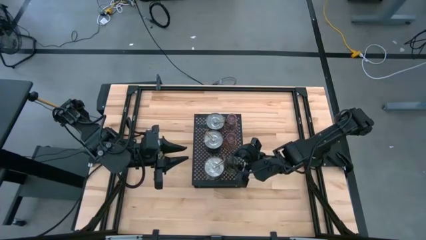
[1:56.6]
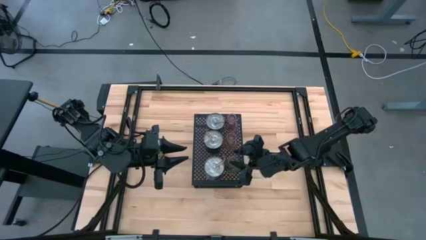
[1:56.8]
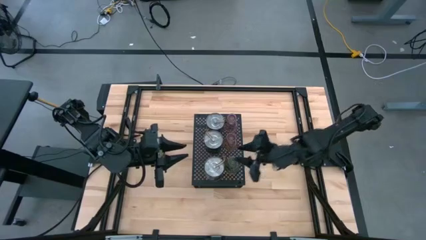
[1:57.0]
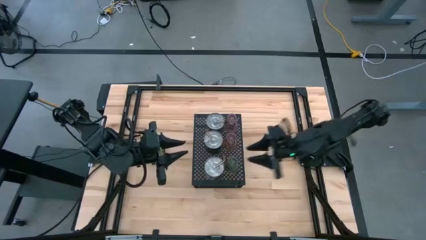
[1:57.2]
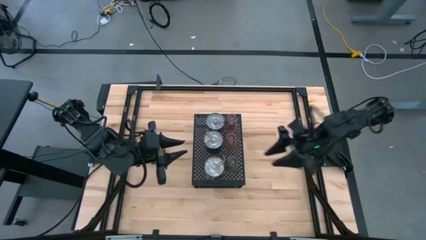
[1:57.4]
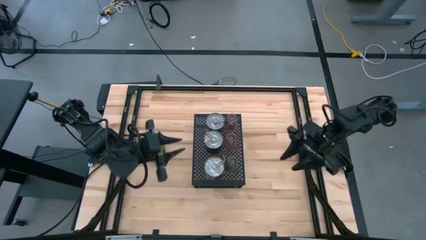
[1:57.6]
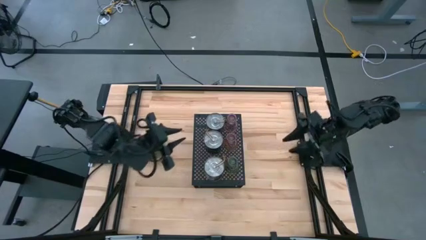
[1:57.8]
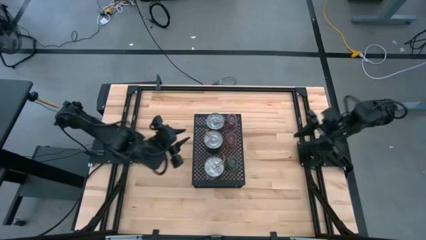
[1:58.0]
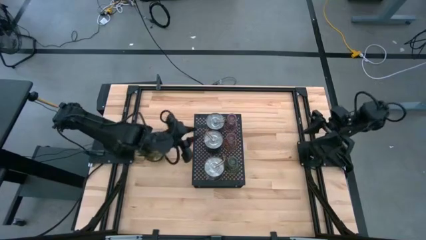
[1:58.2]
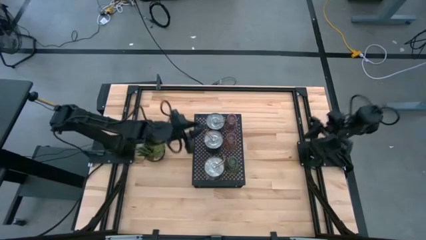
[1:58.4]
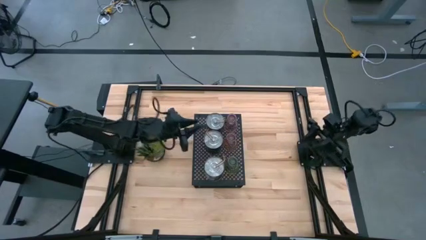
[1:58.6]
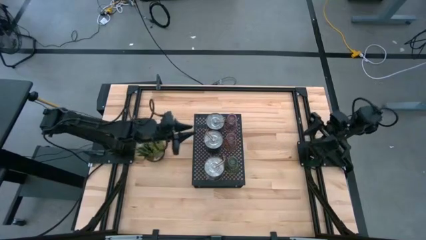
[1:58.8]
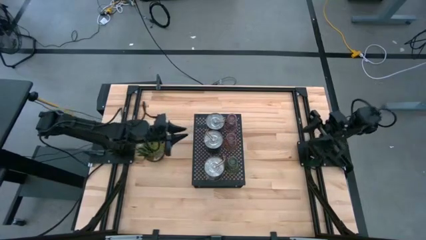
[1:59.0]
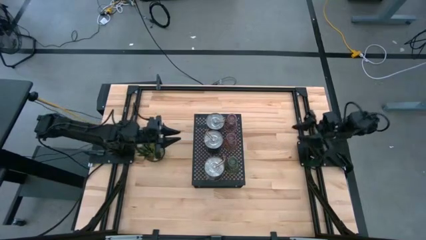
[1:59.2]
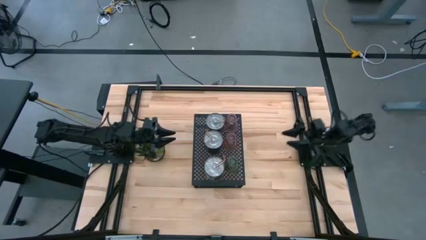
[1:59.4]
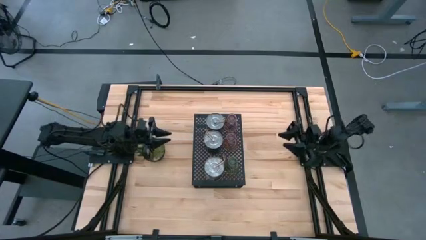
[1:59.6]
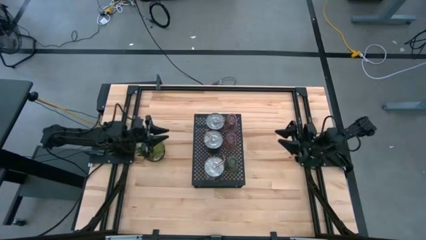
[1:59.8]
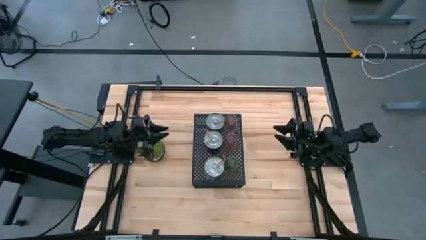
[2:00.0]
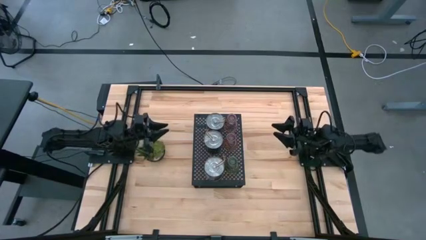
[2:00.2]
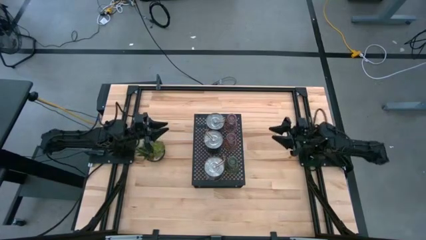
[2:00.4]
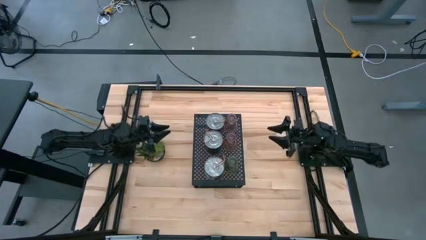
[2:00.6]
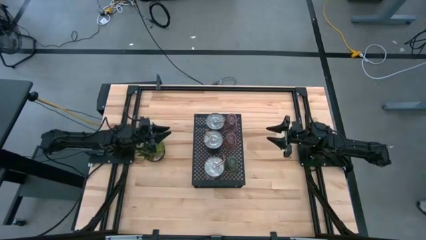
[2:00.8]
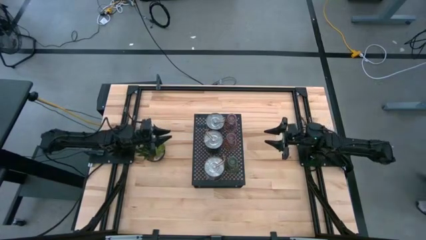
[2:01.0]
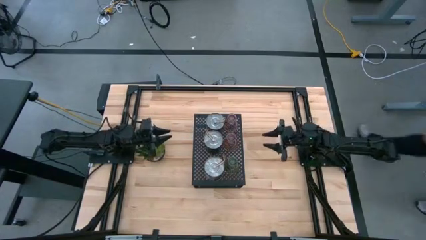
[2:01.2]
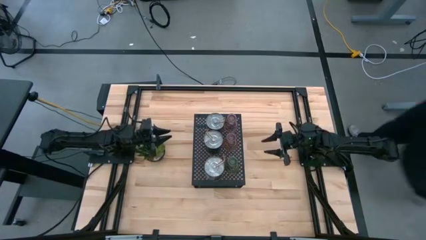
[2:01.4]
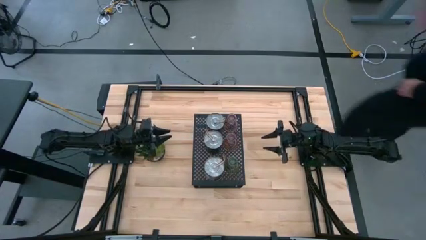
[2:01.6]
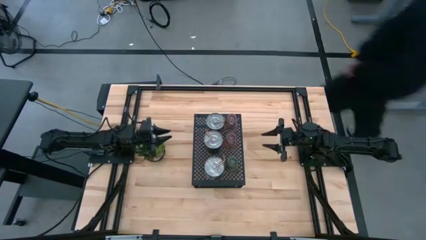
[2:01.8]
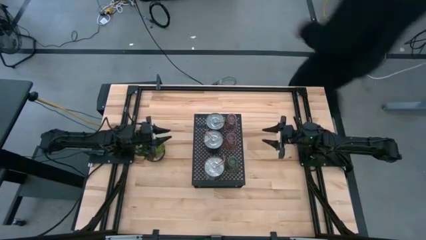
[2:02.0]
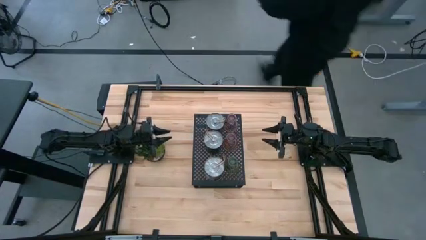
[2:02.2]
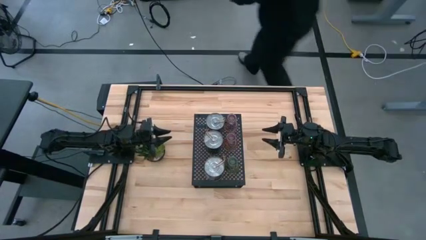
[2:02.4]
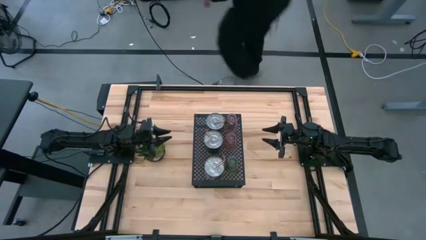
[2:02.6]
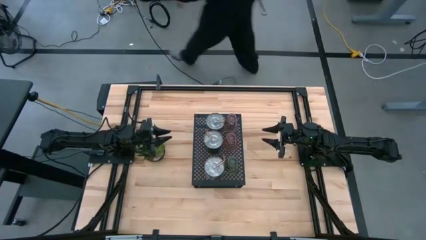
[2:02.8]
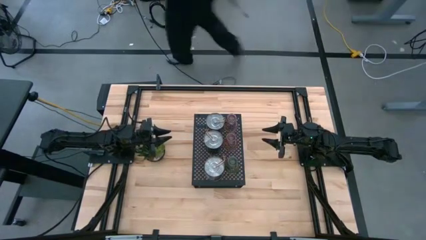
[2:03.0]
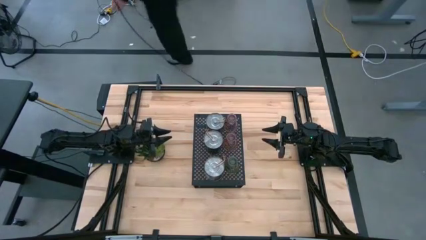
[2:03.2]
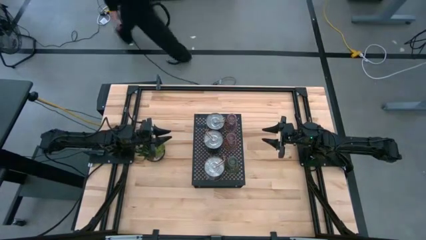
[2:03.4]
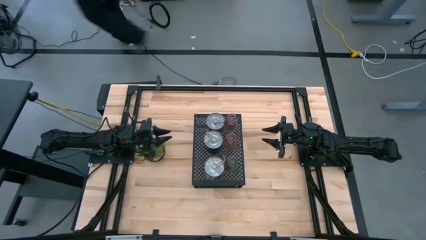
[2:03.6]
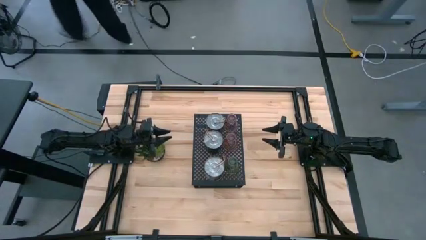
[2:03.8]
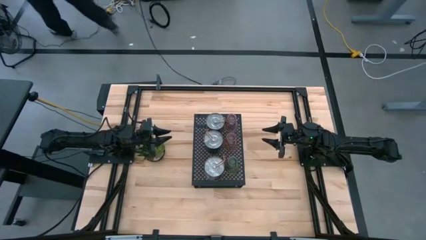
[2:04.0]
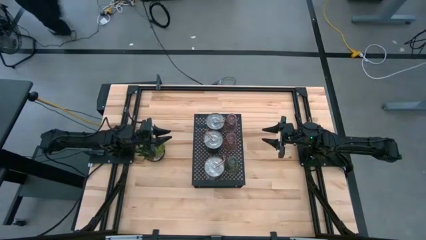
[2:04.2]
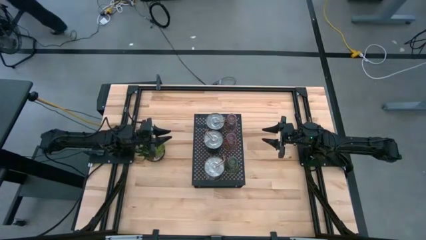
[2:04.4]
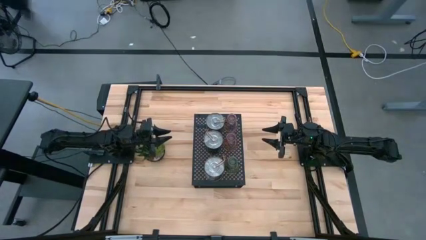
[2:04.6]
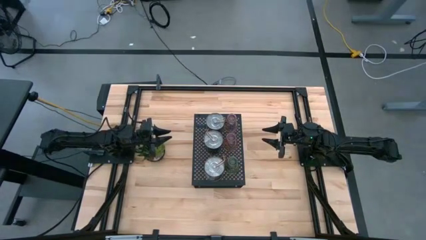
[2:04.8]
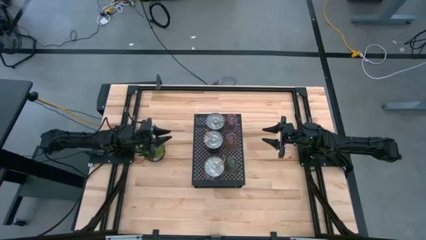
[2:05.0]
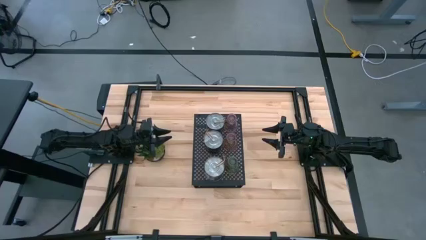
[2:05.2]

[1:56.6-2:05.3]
Task: Pick & Place candle stick holders
Return to Home Position

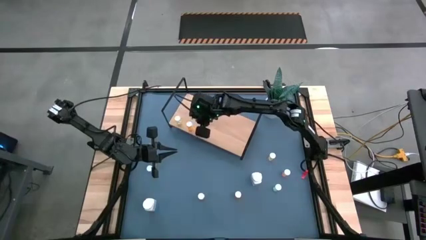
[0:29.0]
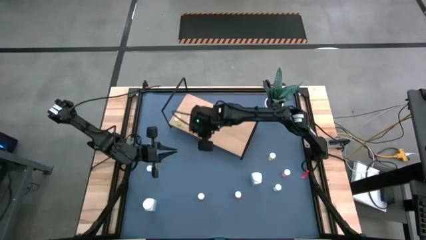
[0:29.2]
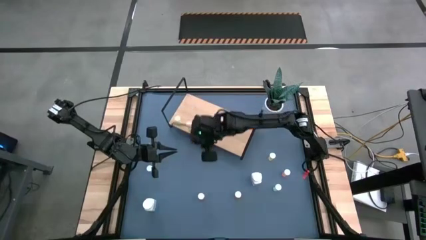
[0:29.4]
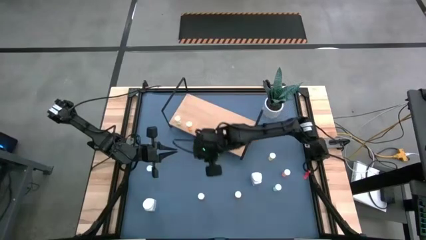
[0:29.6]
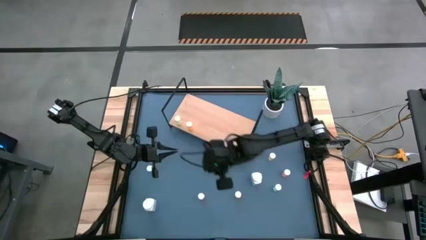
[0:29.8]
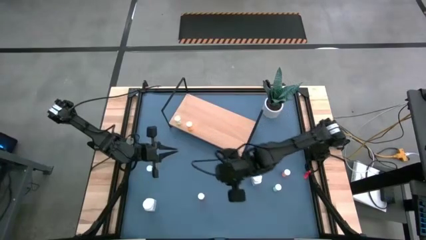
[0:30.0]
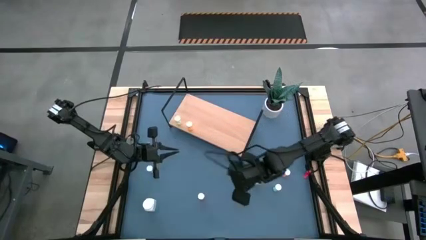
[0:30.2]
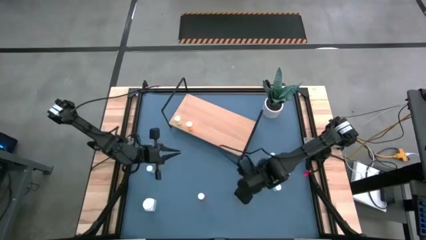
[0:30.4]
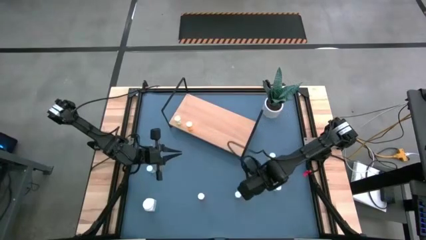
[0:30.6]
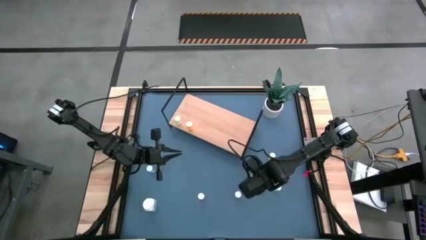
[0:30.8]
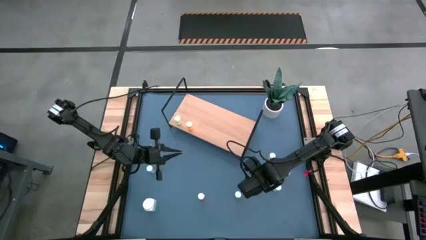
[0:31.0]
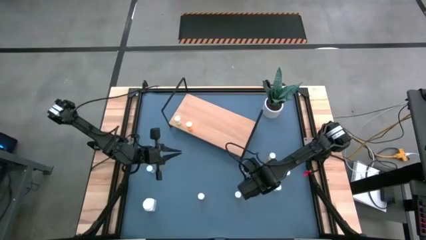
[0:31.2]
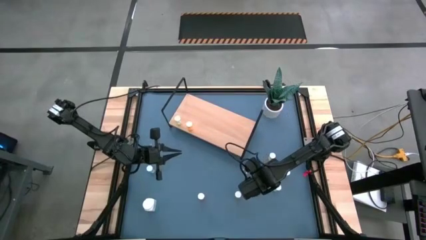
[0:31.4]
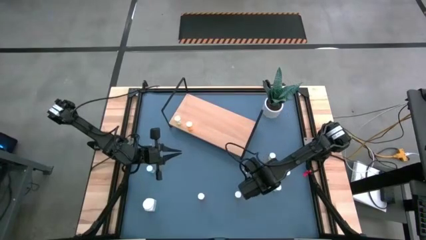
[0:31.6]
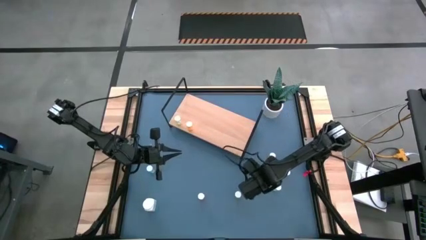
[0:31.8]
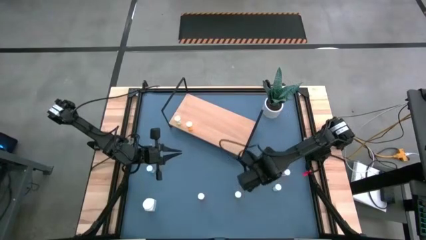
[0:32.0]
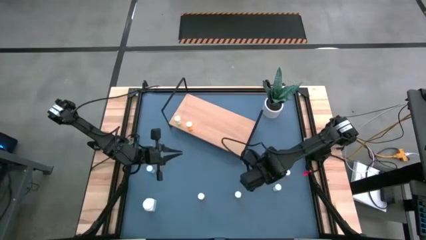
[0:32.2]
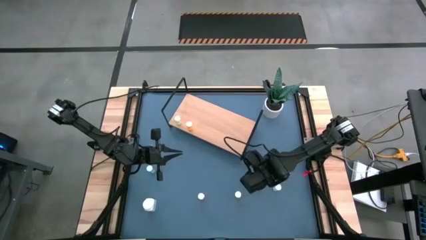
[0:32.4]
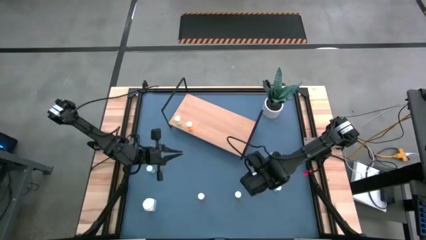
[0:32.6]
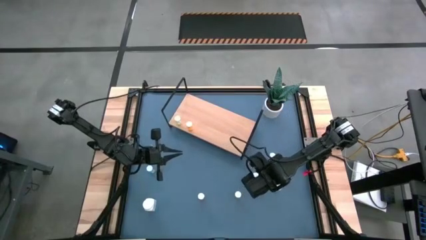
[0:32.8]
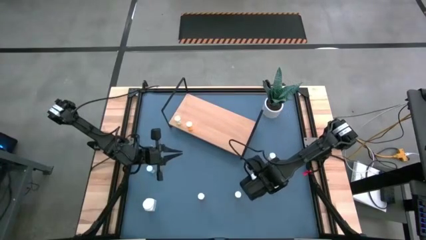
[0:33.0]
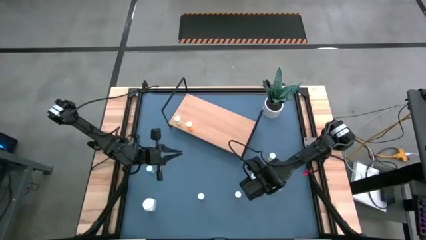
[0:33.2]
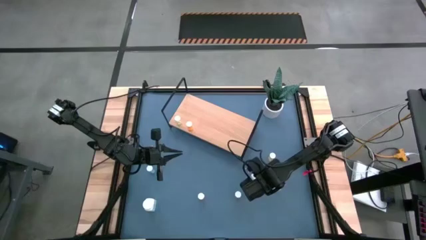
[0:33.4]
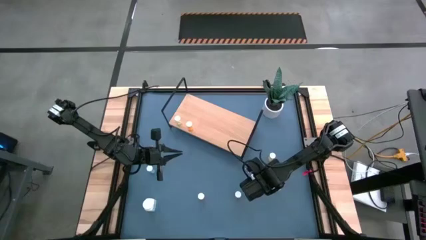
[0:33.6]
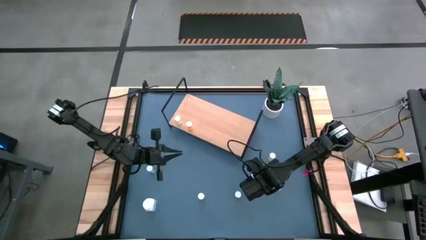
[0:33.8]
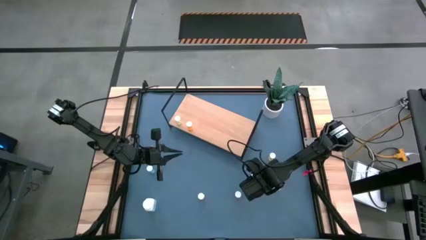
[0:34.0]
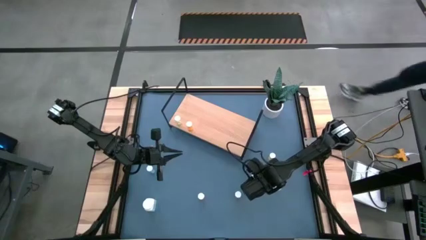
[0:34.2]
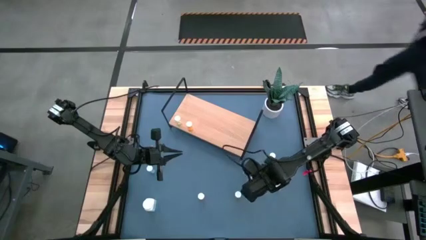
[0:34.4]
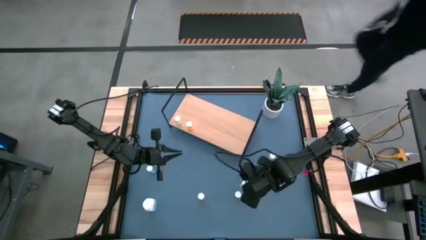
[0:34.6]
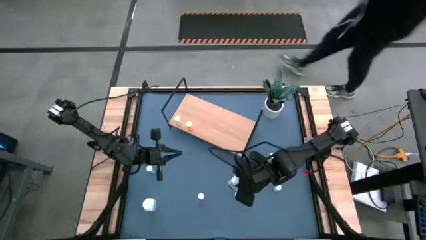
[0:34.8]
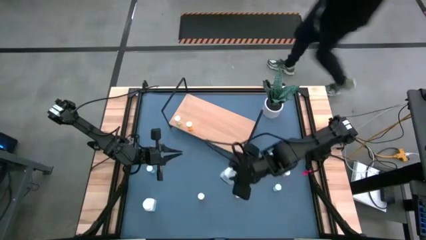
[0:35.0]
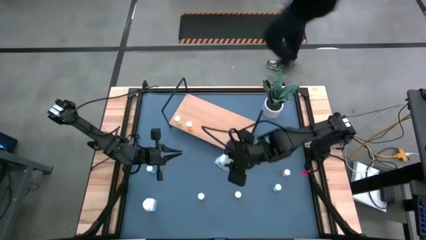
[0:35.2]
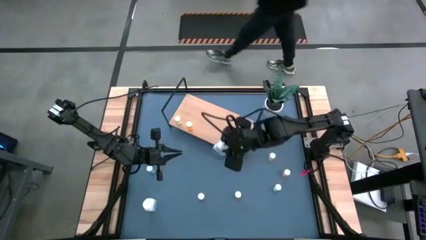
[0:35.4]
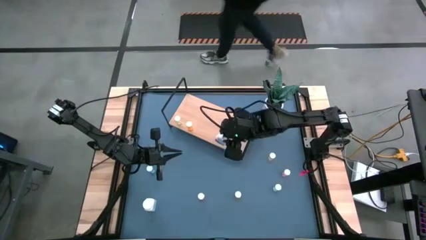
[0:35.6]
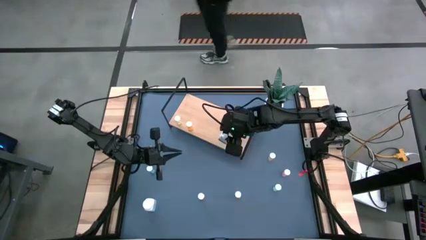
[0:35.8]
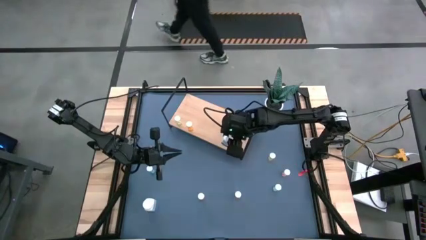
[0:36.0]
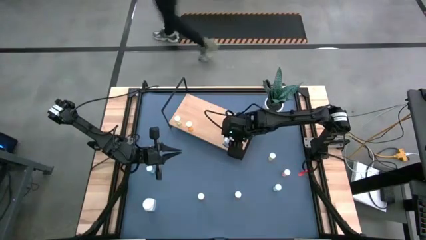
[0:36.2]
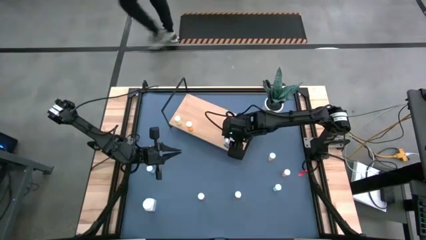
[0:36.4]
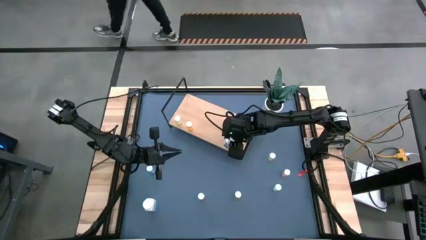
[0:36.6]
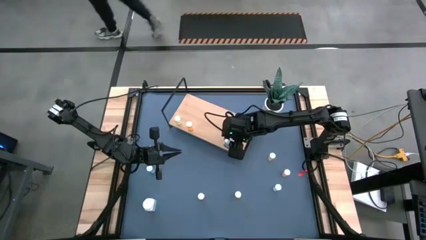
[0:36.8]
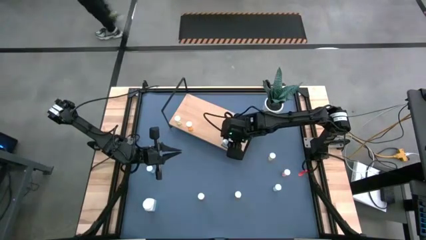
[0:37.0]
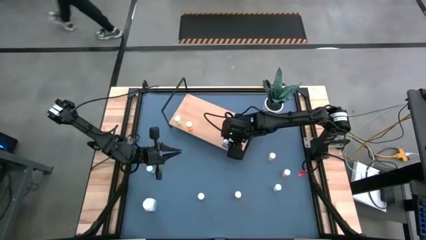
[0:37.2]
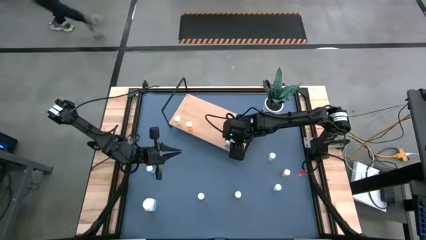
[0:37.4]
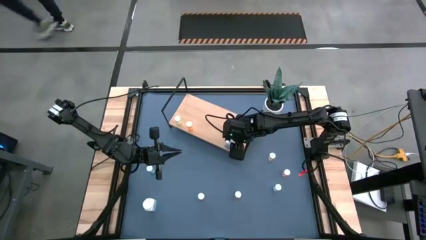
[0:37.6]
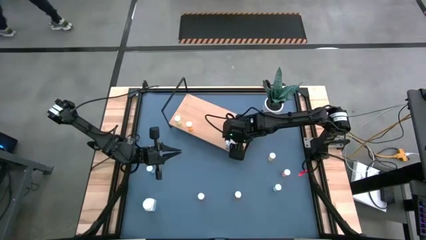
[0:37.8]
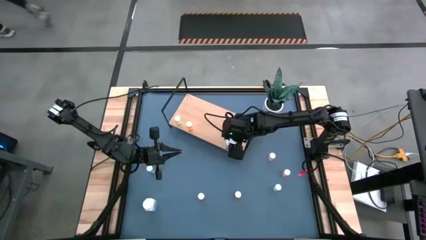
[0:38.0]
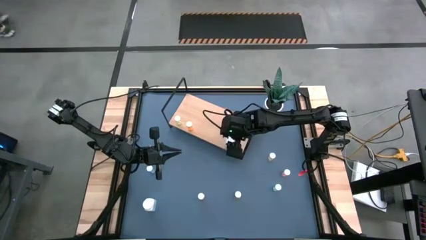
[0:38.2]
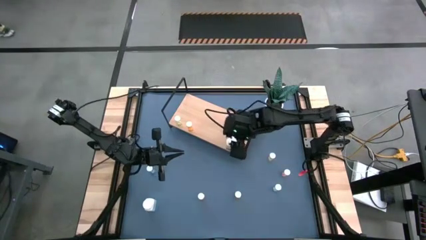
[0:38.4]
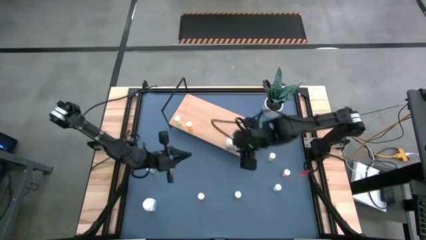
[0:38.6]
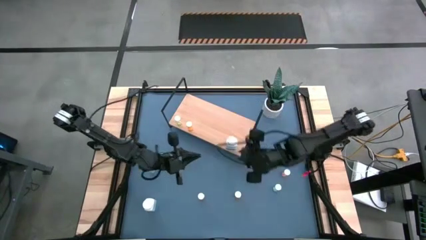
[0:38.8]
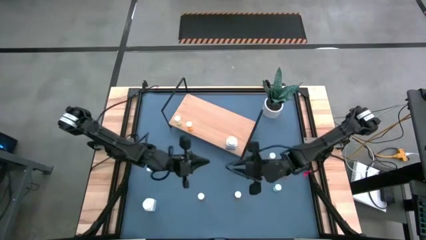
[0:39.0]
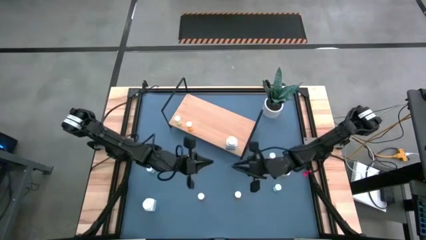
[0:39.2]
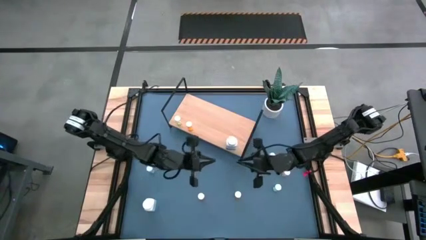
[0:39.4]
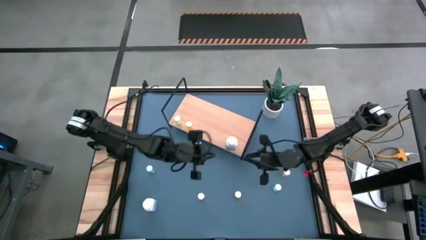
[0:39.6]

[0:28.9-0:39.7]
Task: Pick and place medicine bottles onto shelf by color
Put the right white pill bottle on the shelf
